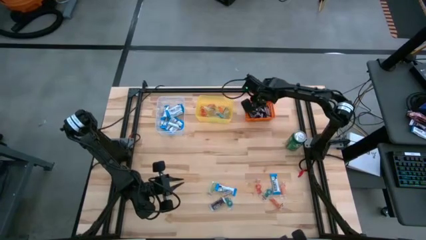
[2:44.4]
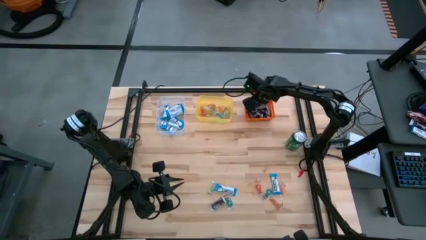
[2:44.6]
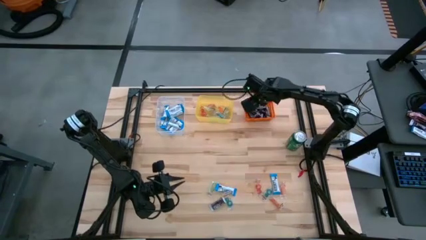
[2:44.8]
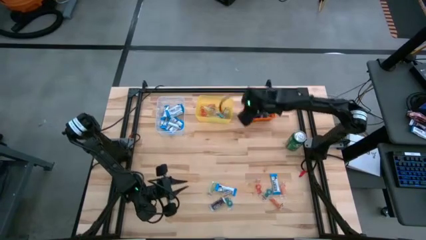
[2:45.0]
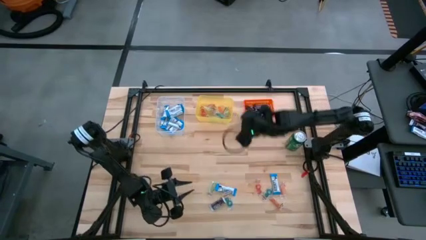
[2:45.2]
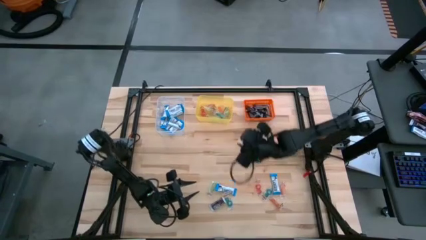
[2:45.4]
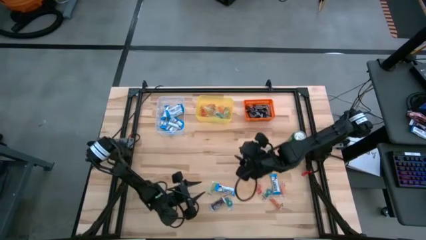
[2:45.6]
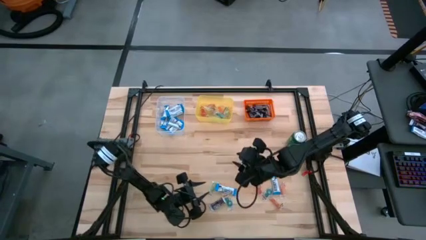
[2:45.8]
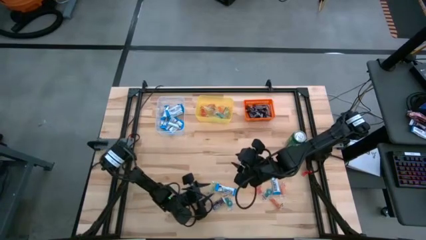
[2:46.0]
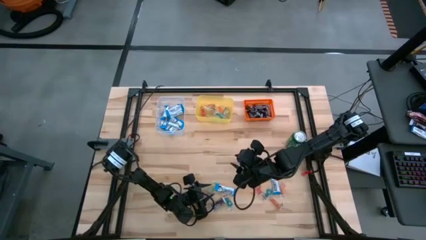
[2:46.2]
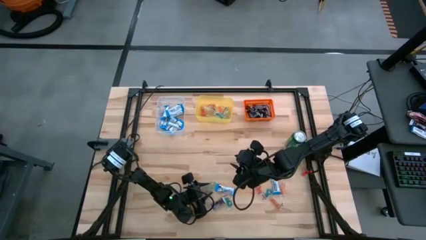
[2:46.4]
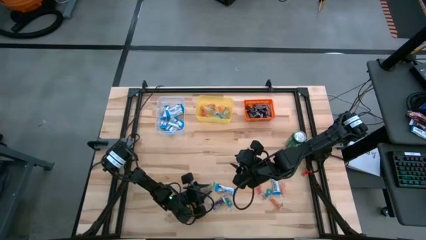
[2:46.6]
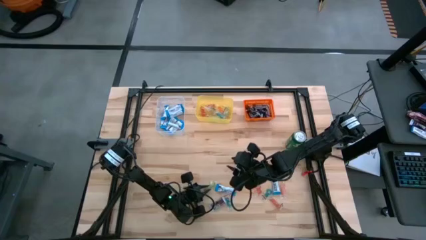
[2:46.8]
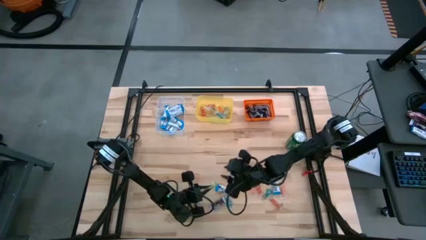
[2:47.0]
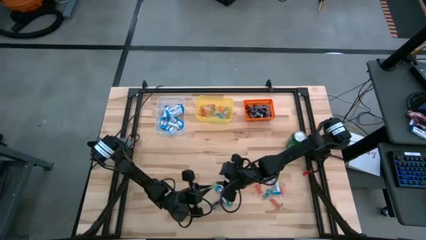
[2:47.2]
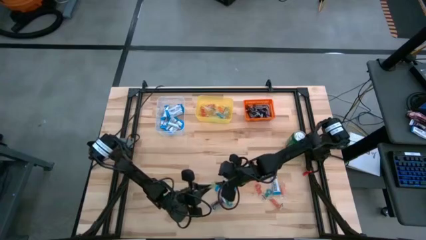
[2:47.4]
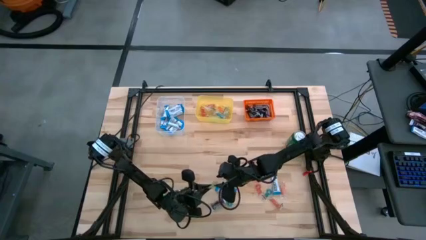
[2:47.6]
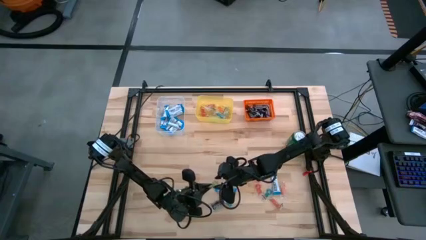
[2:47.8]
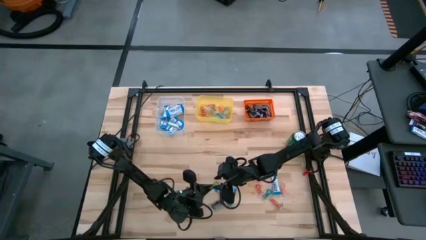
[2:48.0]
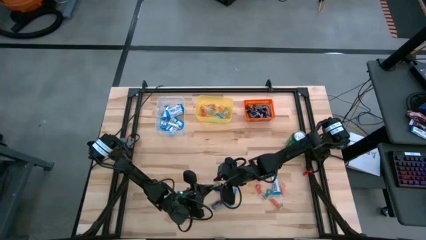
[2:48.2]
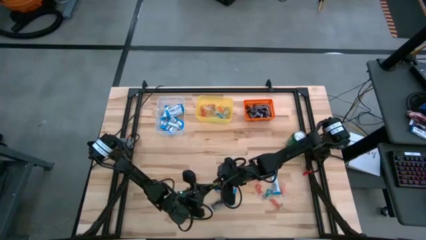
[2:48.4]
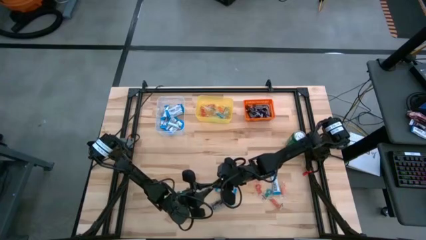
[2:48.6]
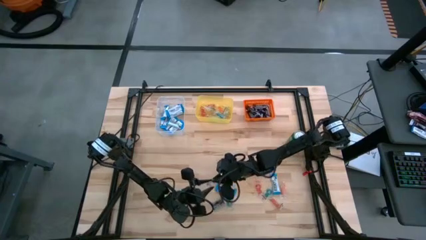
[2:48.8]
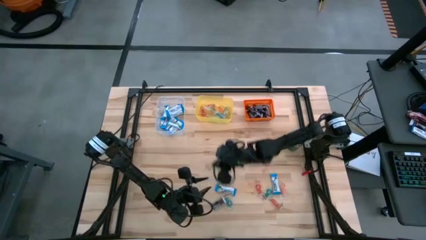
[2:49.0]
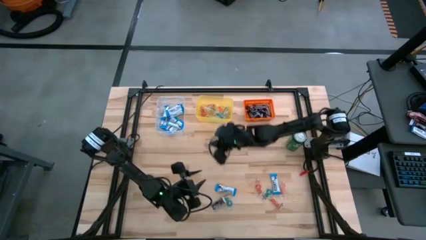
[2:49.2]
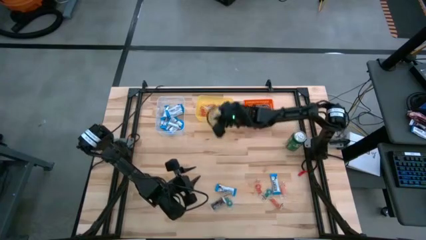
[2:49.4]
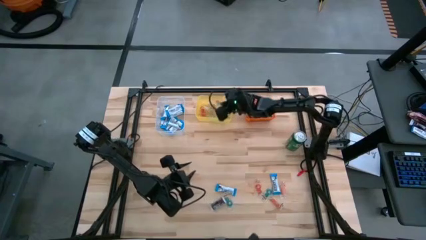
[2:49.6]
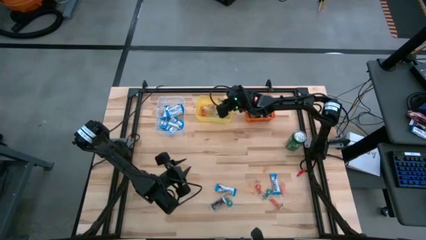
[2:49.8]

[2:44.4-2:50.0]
Task: Sort candy
Put the green gummy into the yellow bin

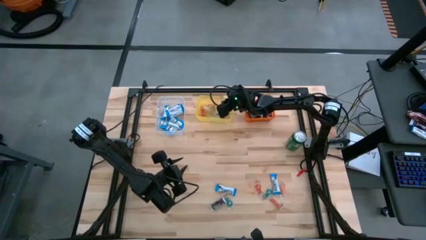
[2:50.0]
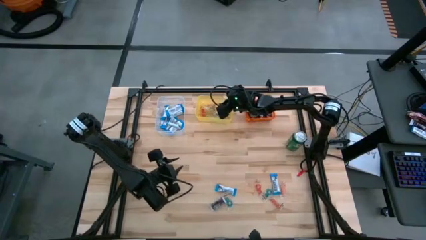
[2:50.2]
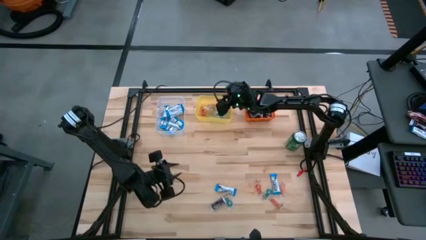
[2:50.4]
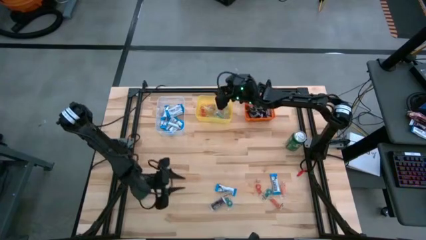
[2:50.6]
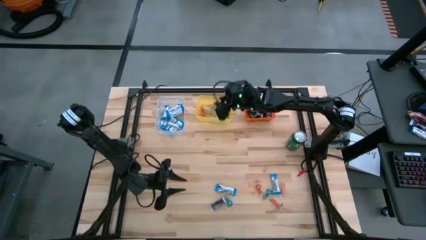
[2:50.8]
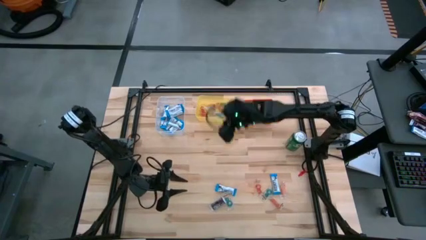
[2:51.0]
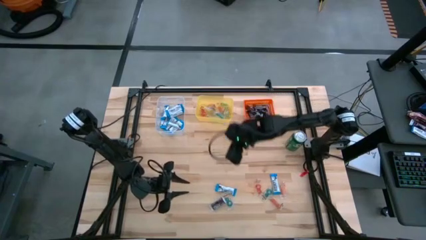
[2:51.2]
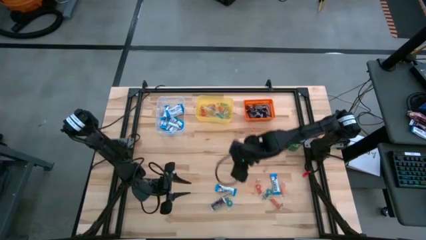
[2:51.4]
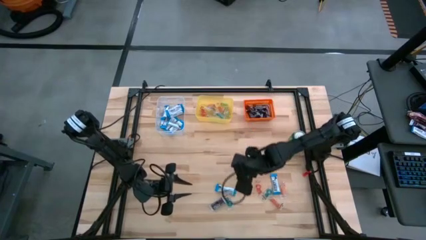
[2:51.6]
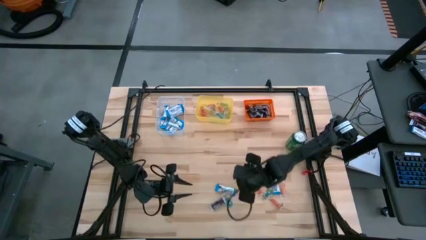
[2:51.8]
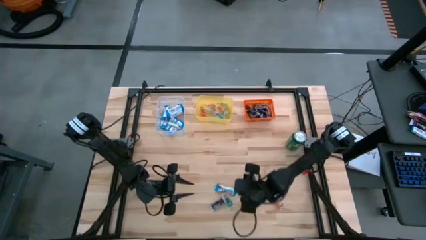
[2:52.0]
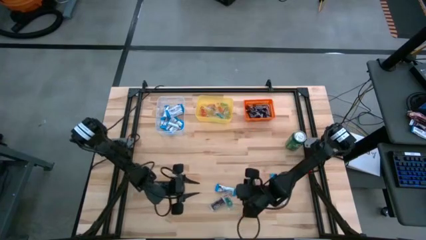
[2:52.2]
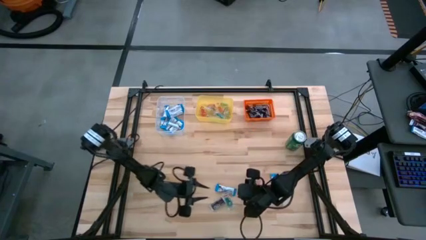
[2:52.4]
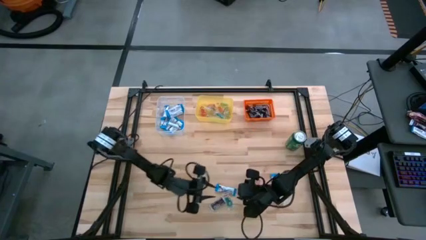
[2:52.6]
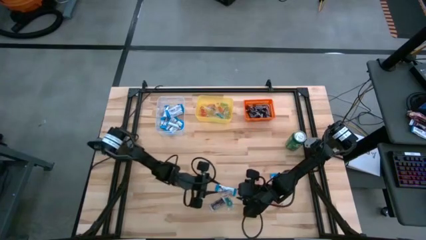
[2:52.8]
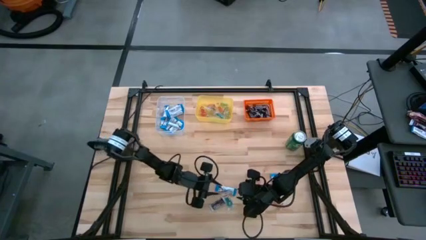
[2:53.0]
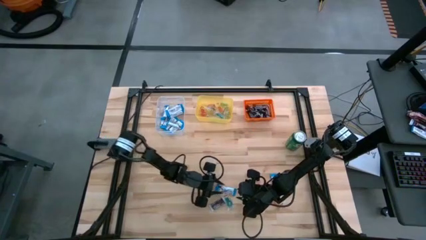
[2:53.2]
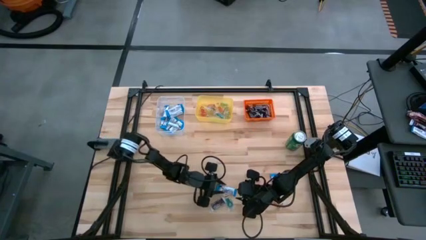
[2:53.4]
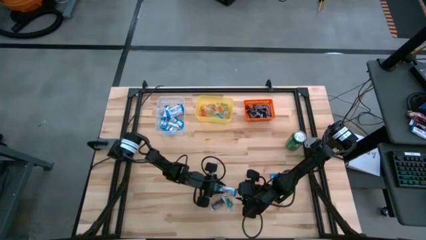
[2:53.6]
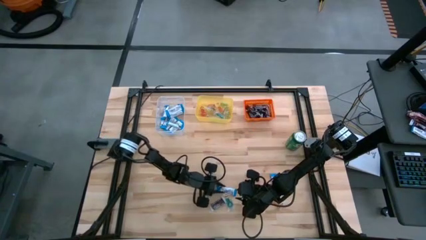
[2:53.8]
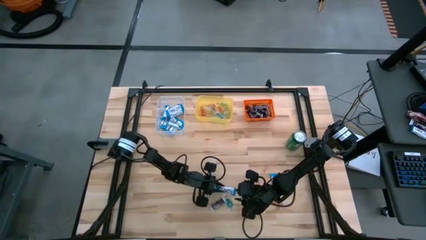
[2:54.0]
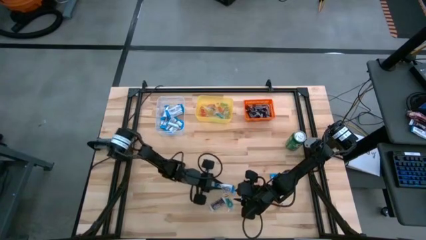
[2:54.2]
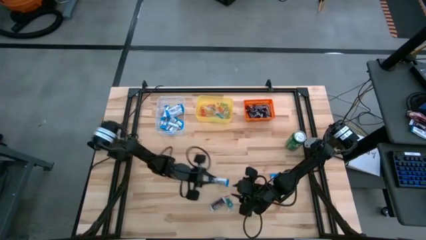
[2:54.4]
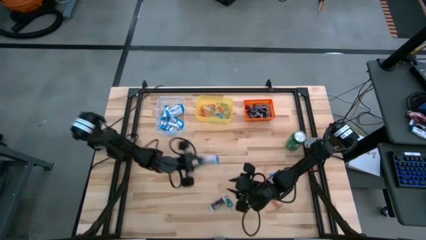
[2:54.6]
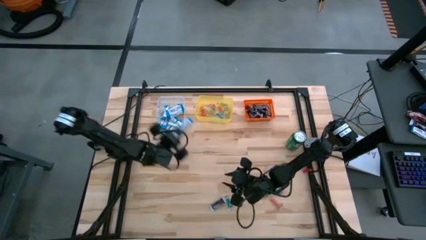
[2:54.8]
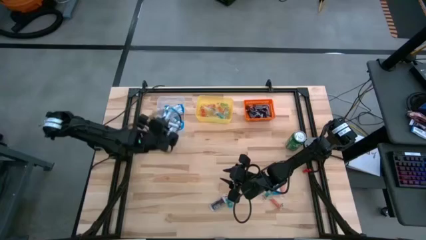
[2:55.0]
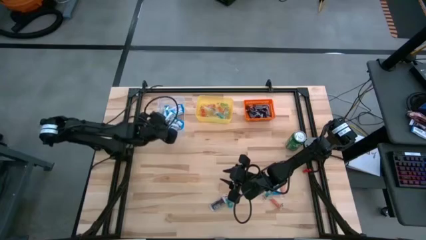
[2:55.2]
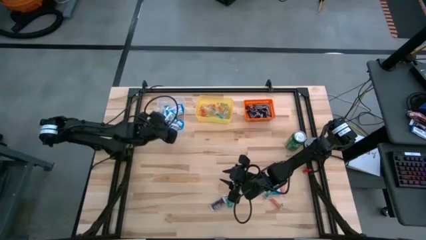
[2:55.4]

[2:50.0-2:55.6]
Put the white chocolate into the transparent bin

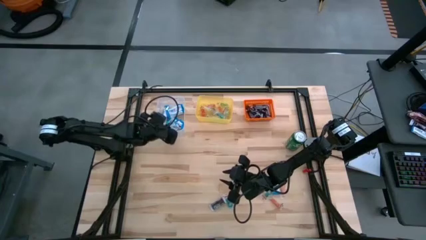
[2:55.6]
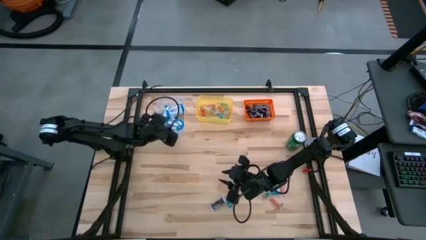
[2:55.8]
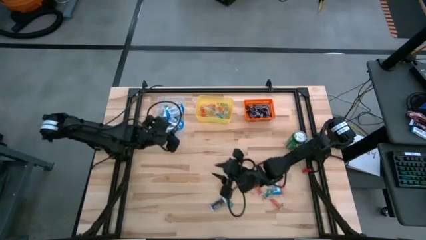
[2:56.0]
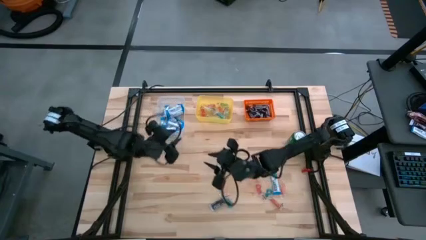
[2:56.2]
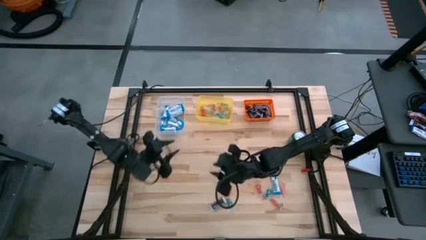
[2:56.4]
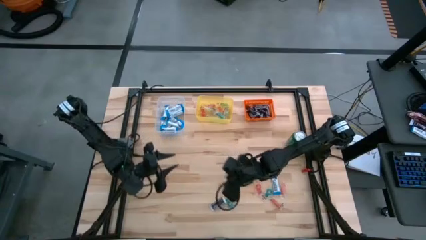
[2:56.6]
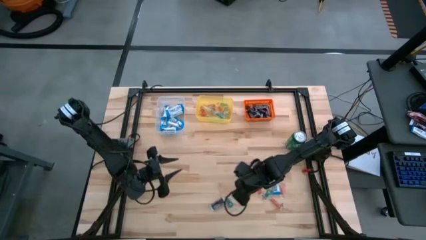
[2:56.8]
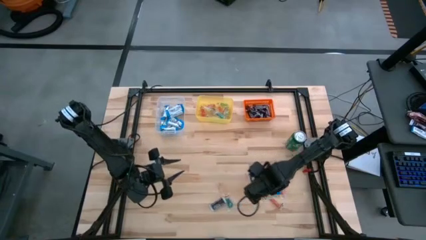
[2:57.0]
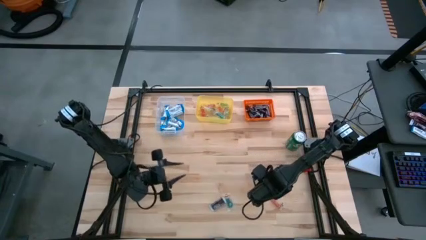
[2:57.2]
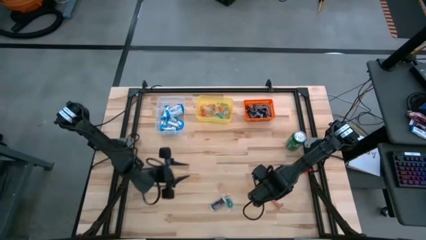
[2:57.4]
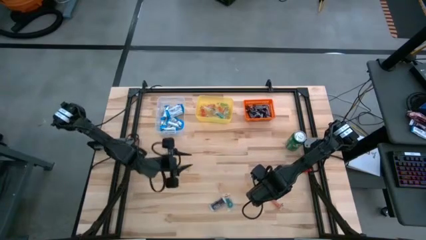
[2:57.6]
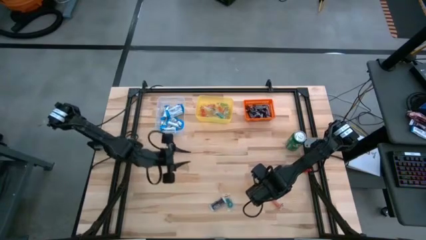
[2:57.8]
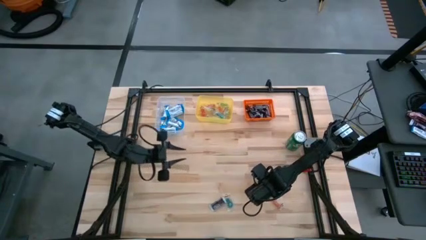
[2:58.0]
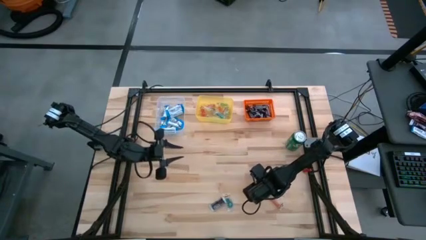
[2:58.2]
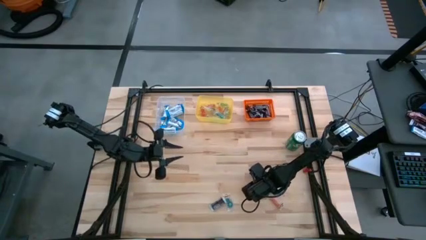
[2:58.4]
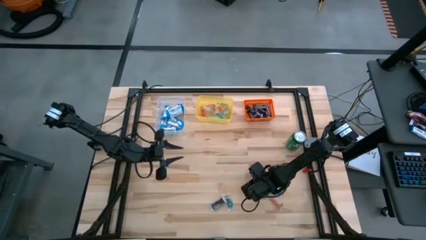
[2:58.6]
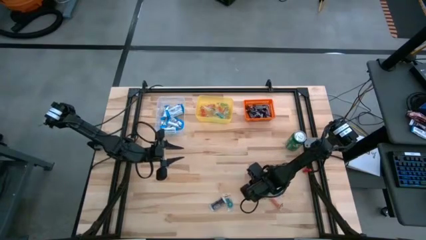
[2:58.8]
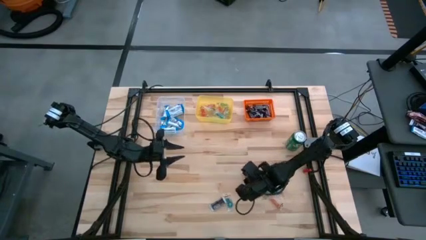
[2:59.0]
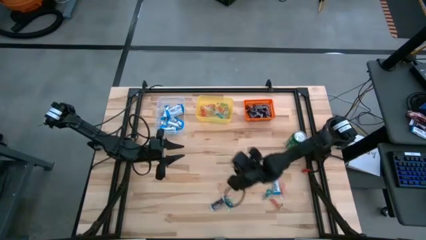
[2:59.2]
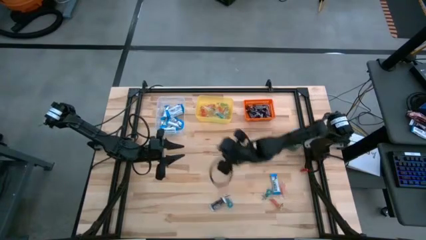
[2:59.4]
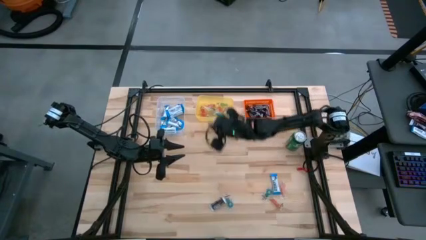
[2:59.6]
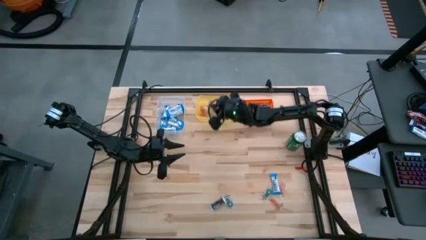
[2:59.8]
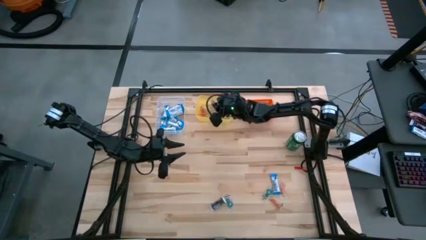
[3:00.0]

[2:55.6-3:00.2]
Put the red gummy into the yellow bin

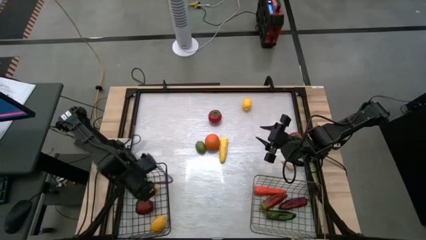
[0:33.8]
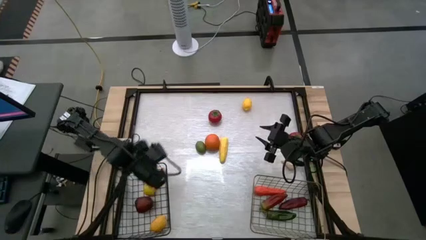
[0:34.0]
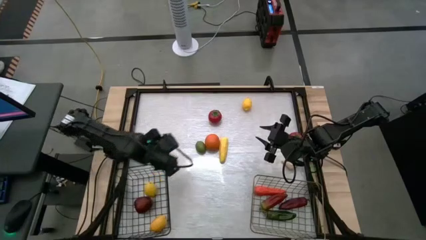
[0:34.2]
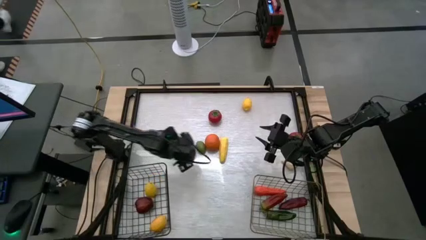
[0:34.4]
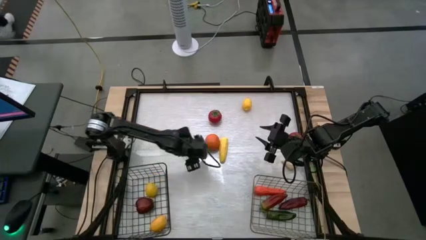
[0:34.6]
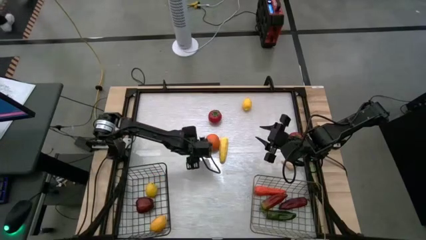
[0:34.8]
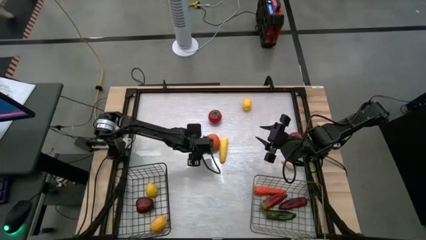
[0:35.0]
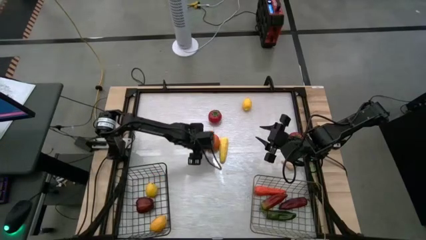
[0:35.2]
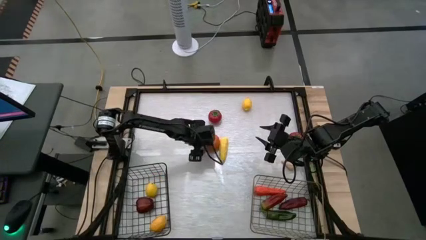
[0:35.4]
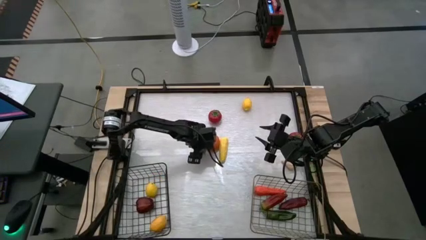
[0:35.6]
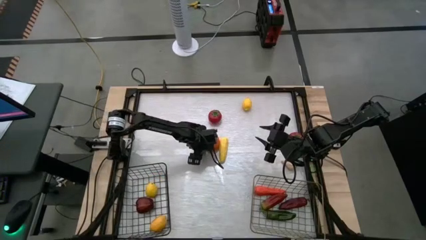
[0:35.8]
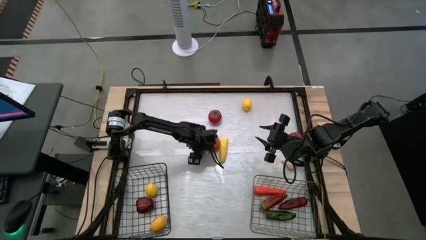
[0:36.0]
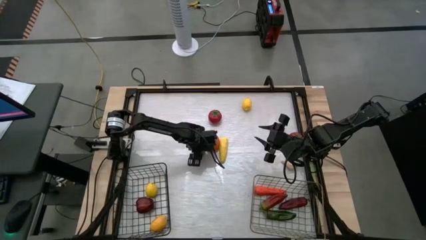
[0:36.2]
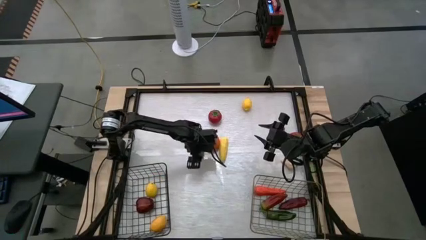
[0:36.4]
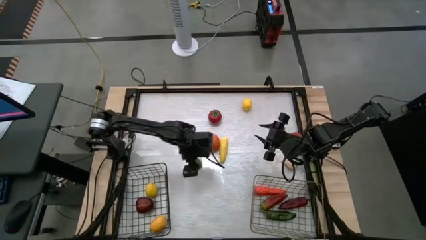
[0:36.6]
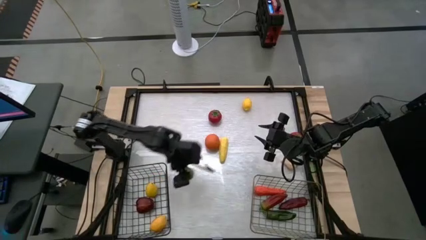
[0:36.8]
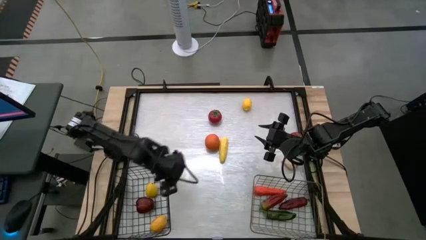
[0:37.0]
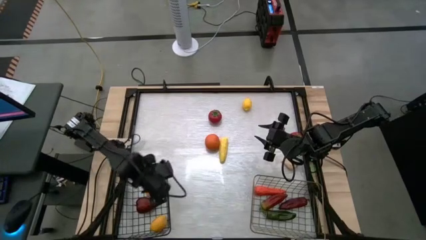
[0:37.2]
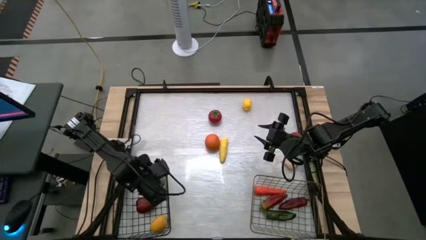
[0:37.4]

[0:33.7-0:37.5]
Task: Sort produce into baskets
Put the bottom lime into the black wire basket
